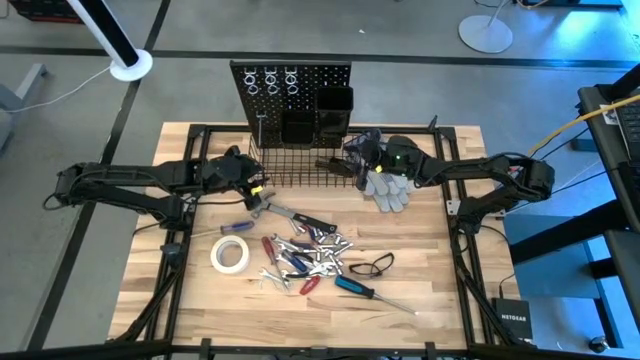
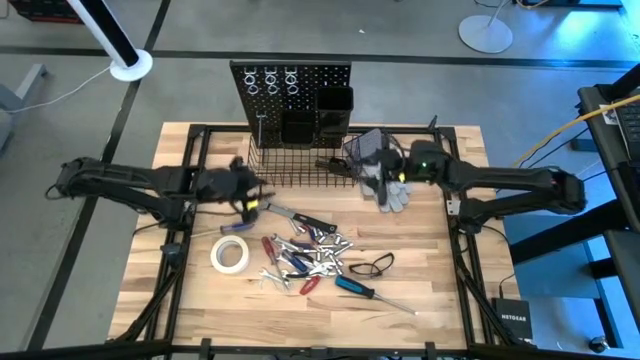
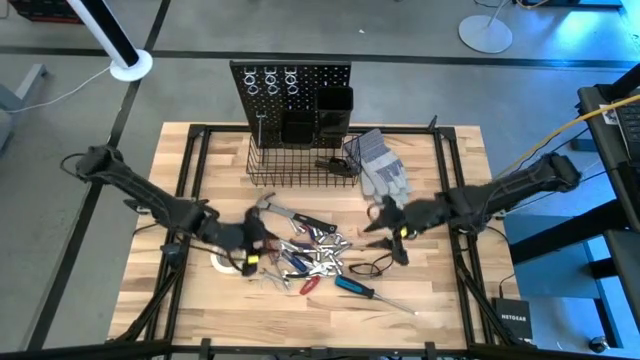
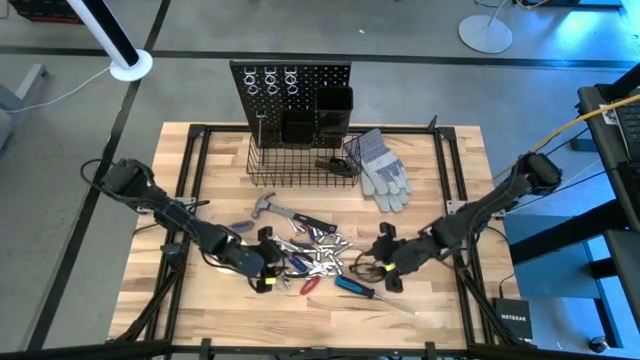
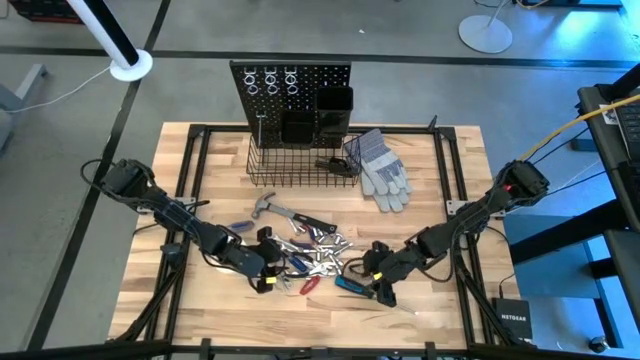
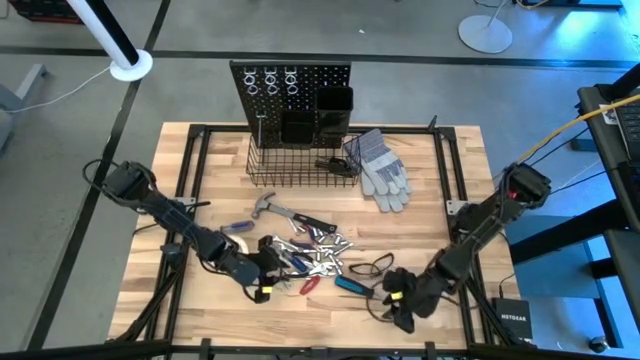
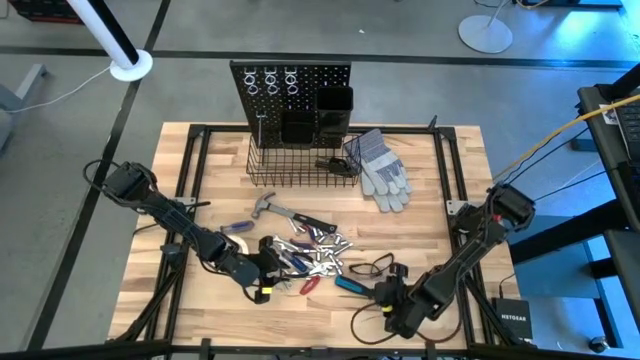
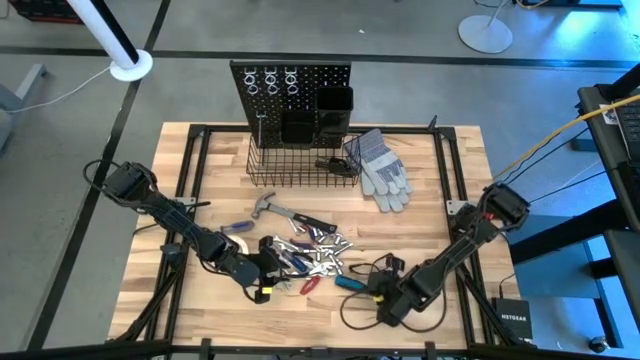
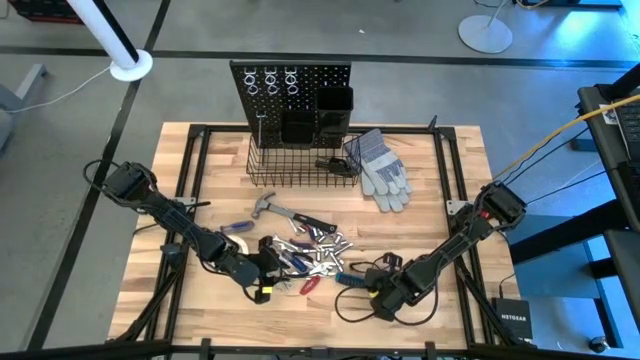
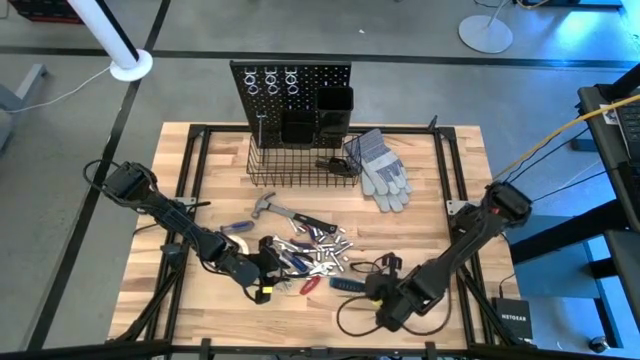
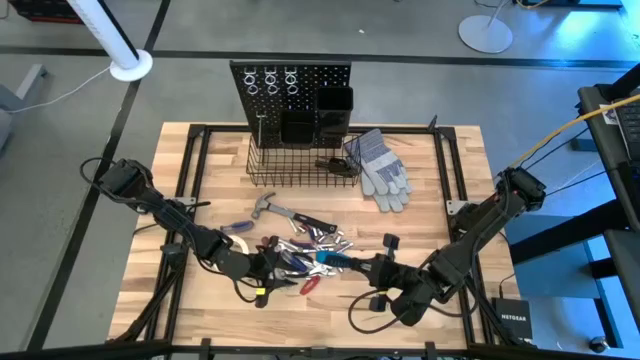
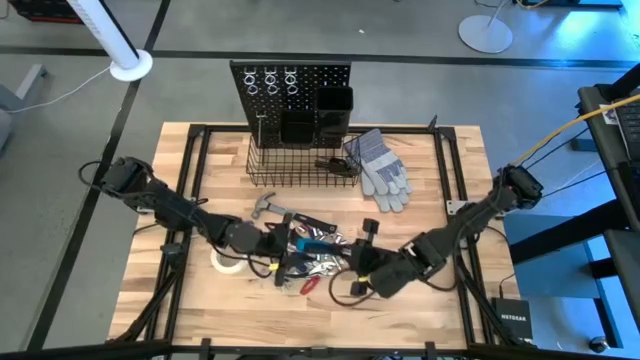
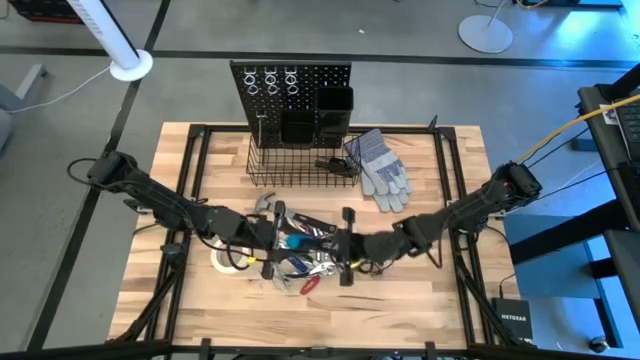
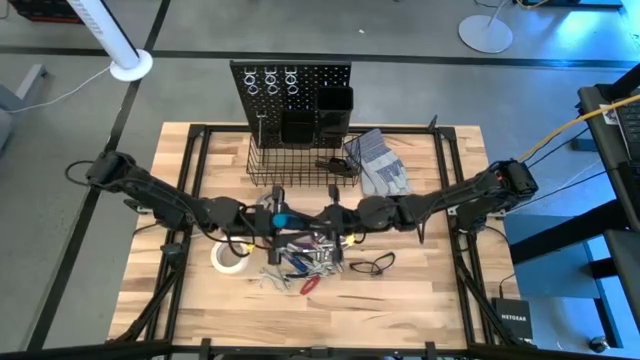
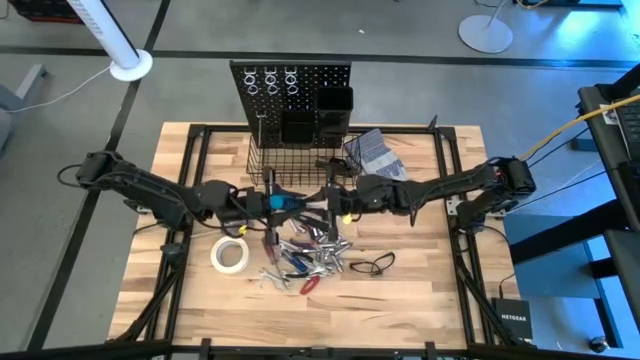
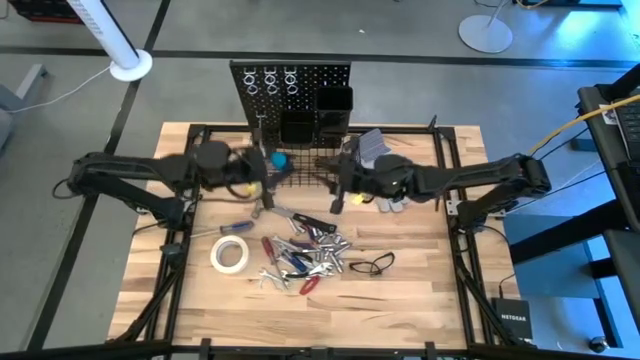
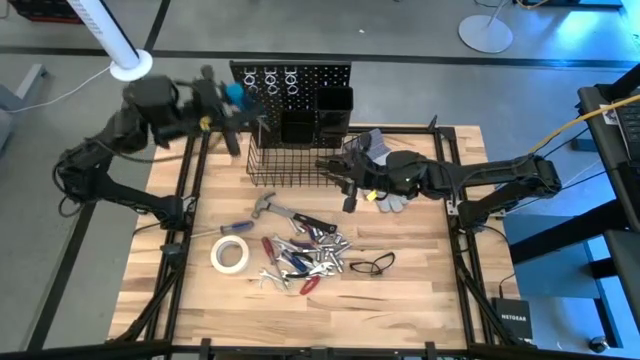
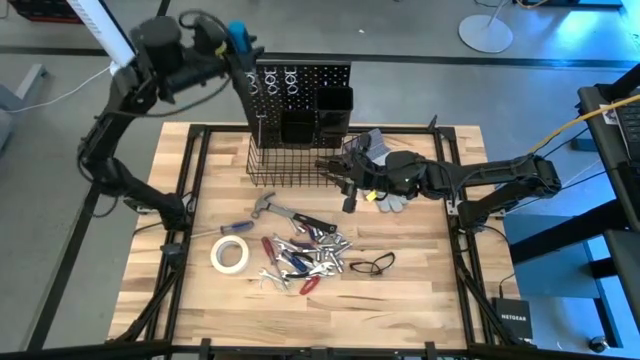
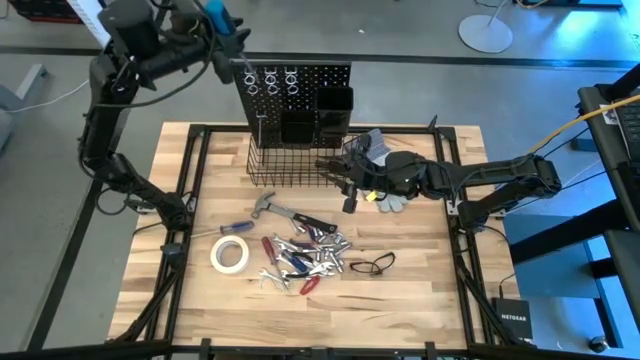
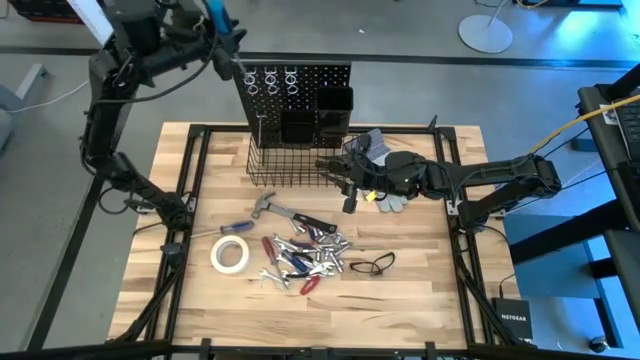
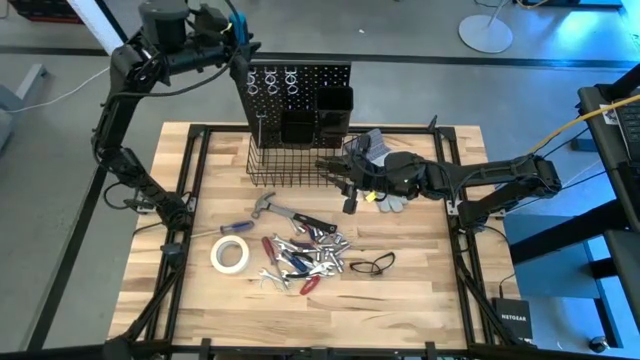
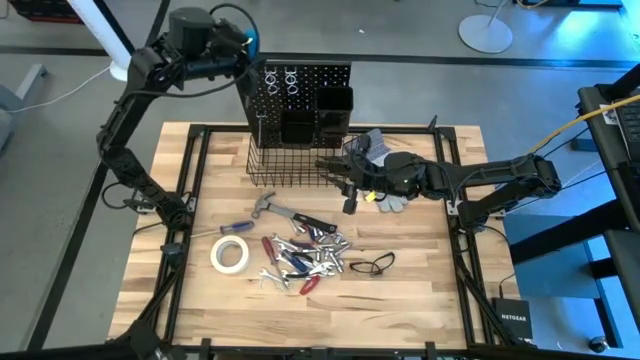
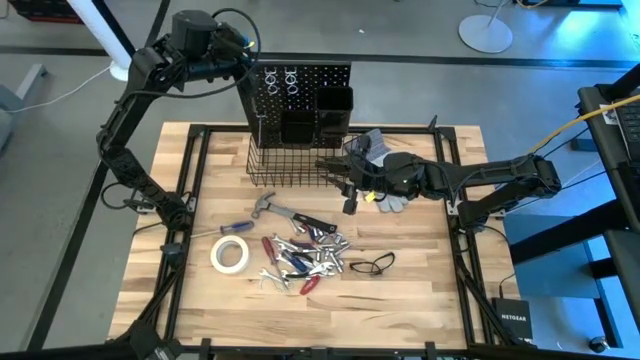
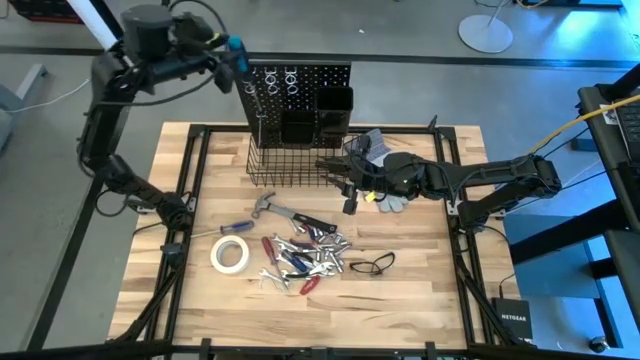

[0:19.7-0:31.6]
Task: Hang tools onto peg board
Hang the blue screwdriver on the peg board

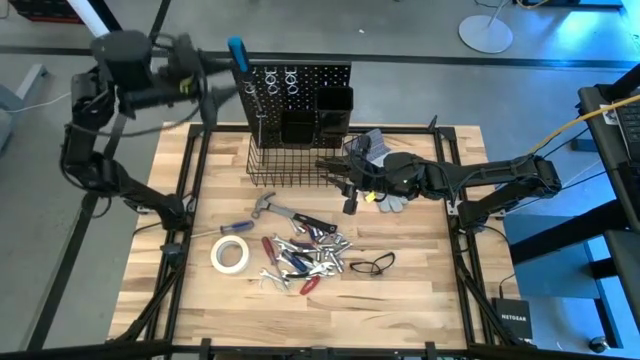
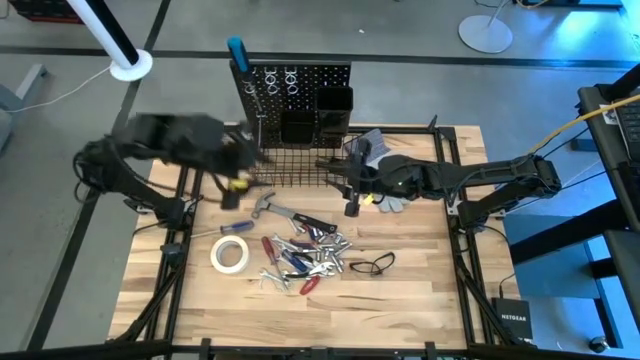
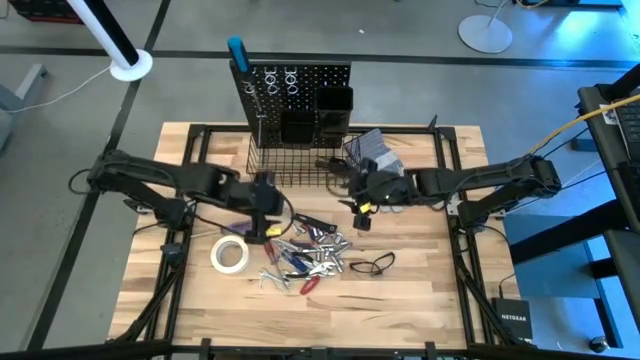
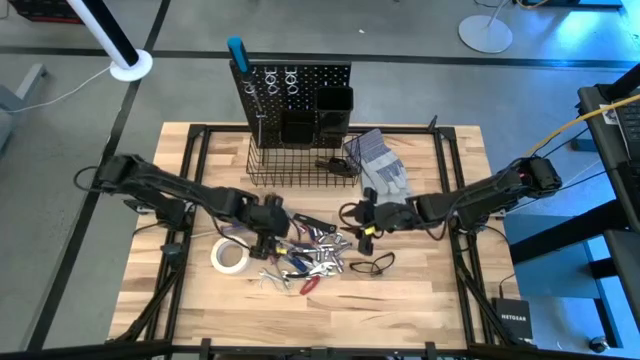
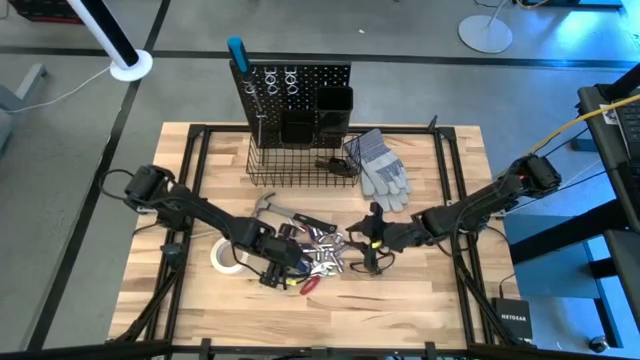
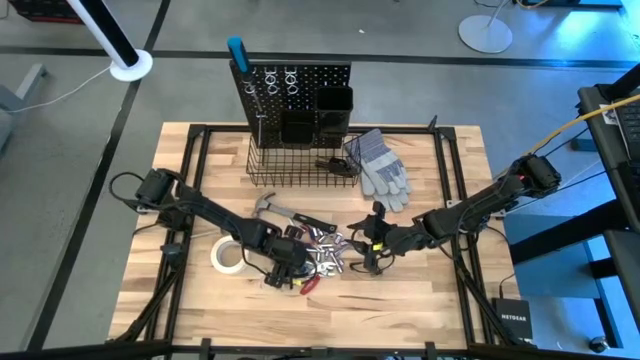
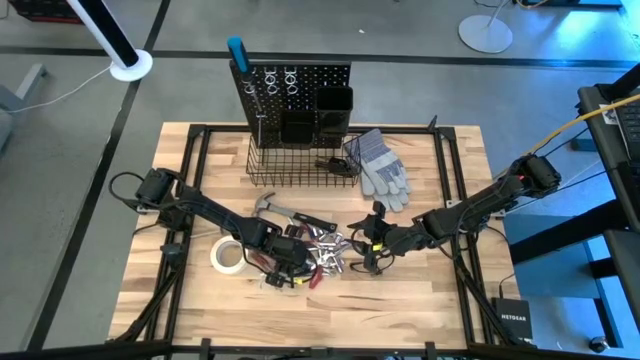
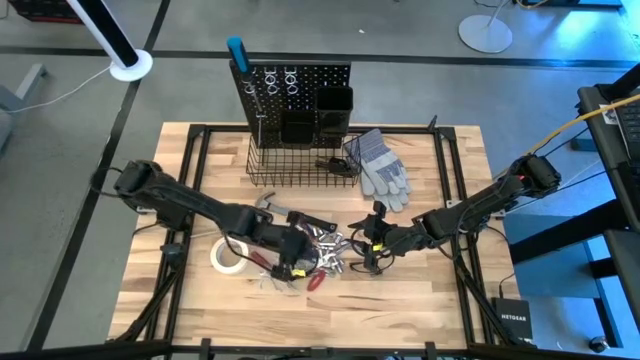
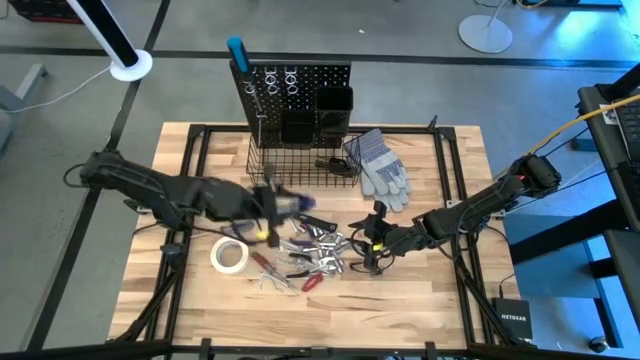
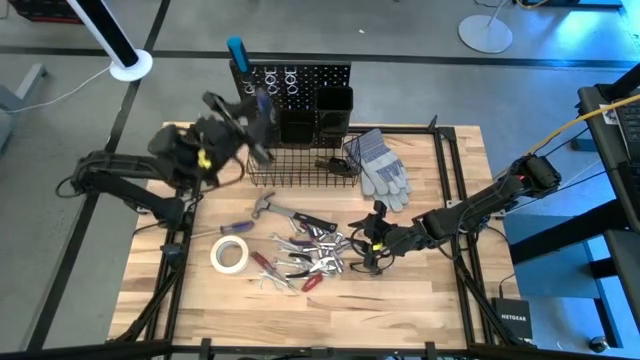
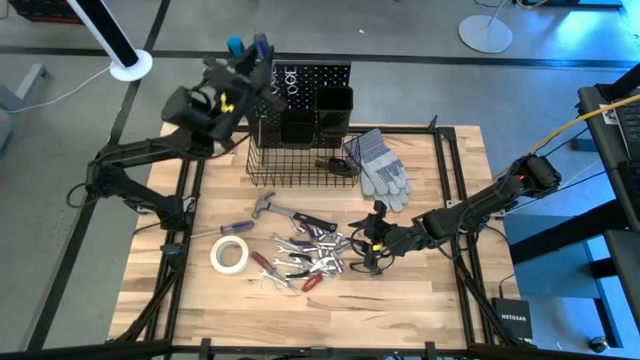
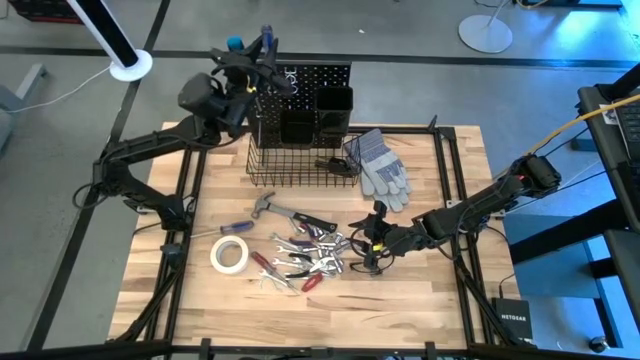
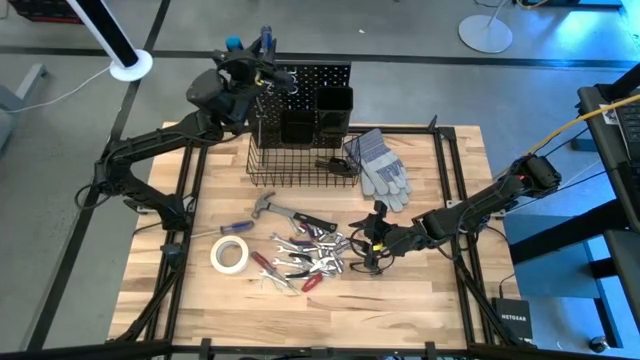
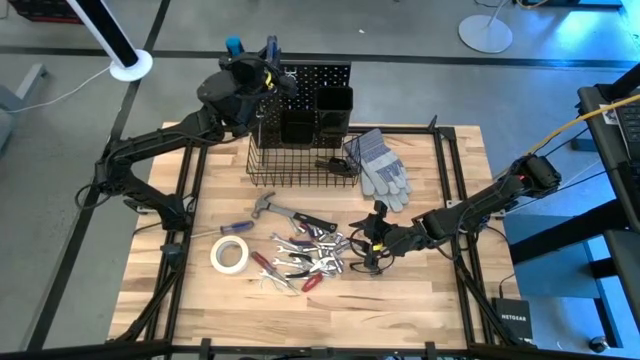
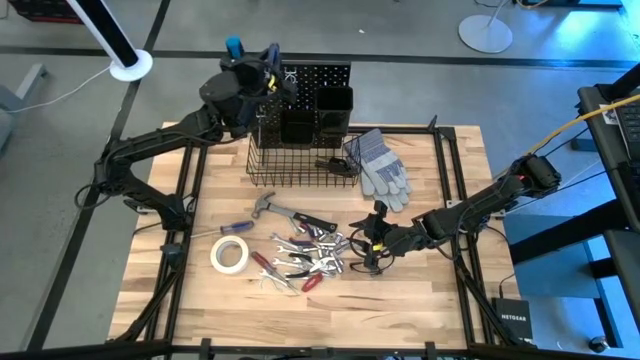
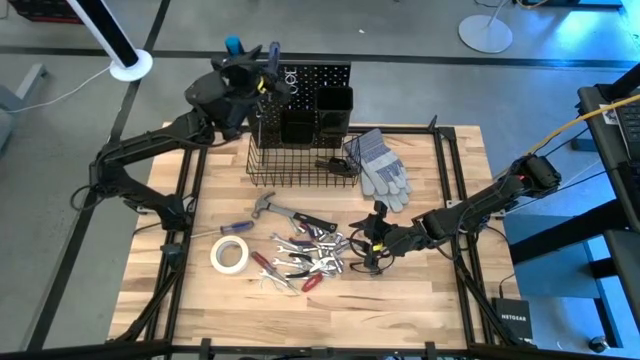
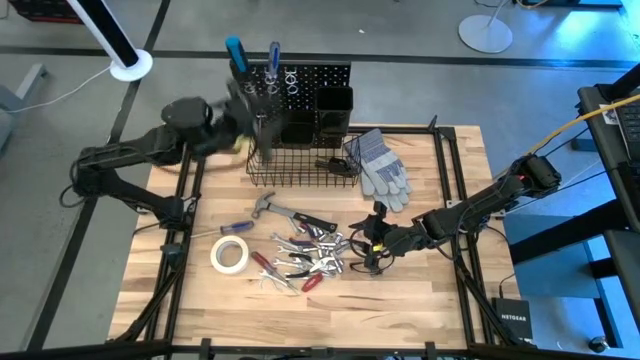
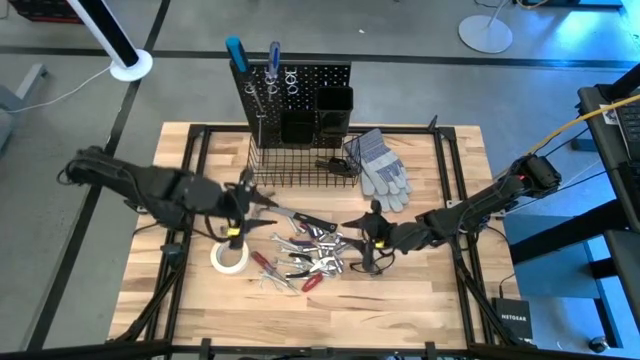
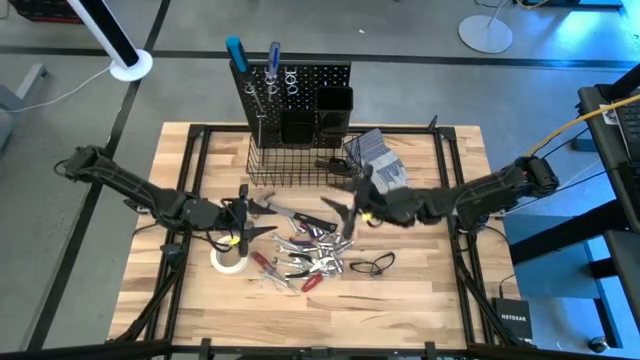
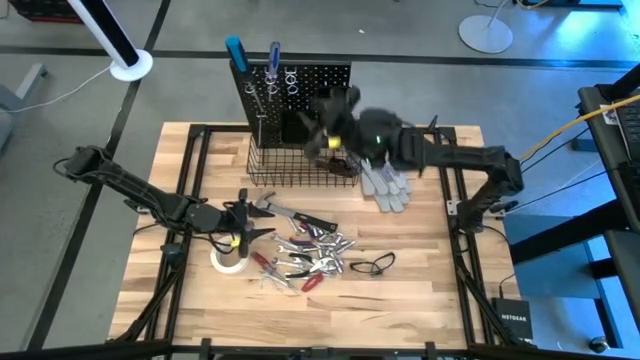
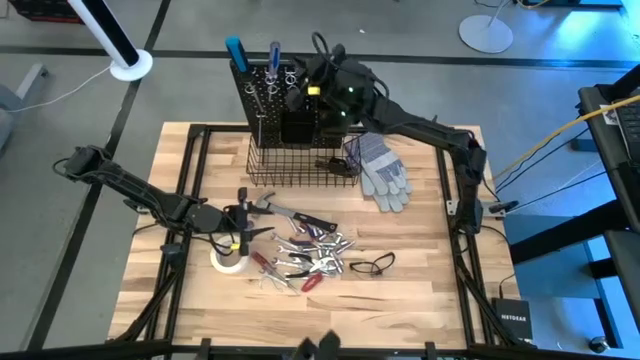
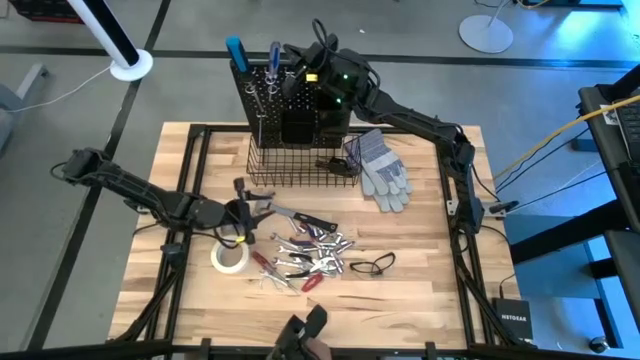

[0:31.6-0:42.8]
Hang the transparent blue screwdriver on the peg board
